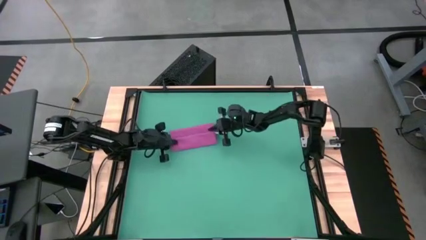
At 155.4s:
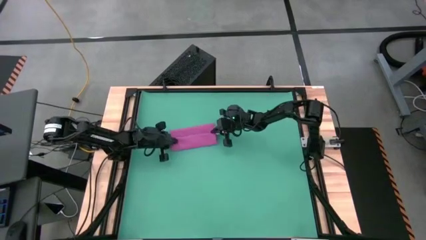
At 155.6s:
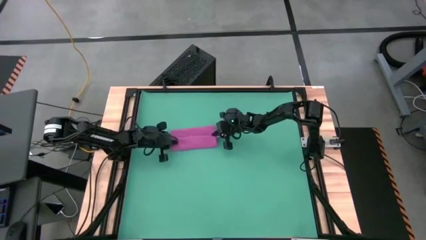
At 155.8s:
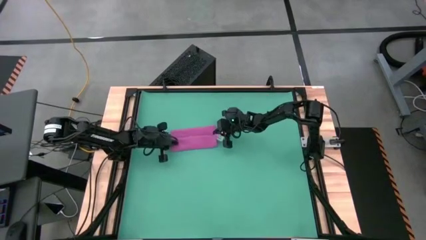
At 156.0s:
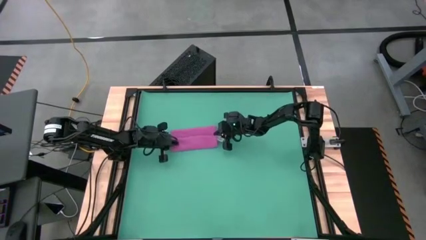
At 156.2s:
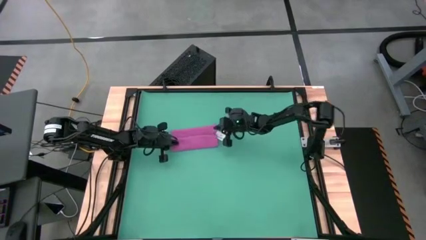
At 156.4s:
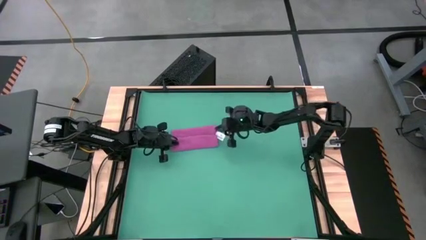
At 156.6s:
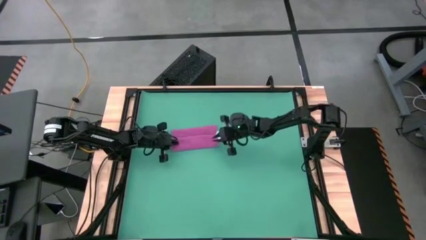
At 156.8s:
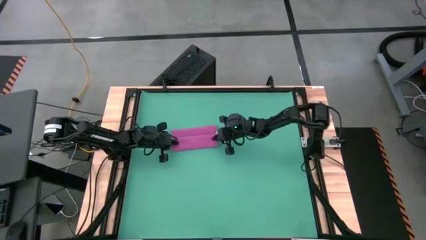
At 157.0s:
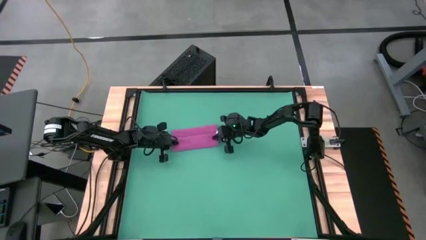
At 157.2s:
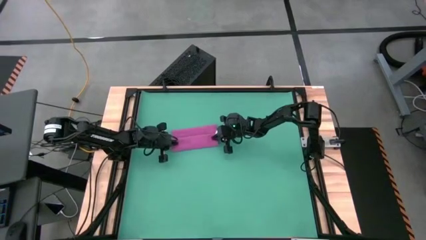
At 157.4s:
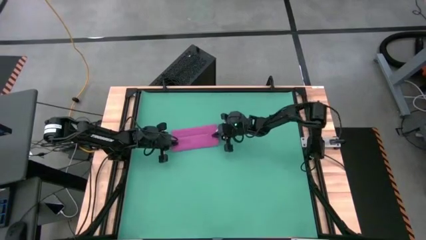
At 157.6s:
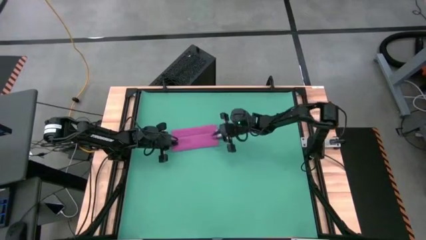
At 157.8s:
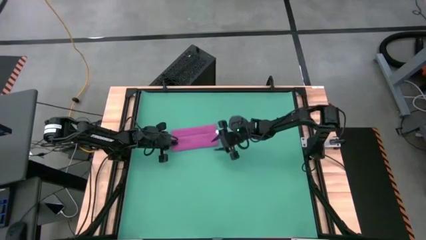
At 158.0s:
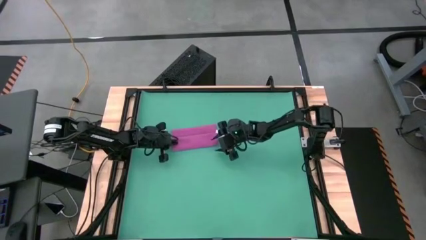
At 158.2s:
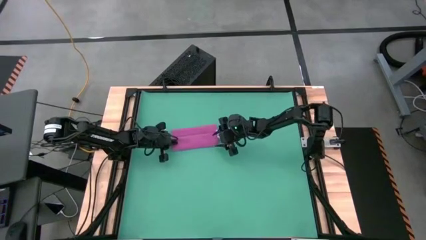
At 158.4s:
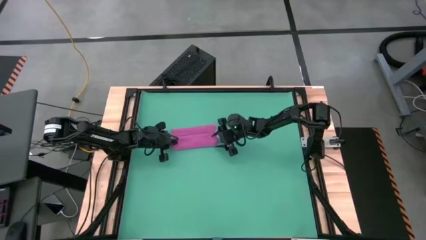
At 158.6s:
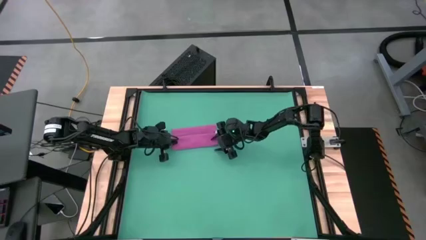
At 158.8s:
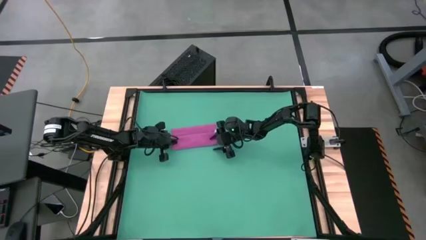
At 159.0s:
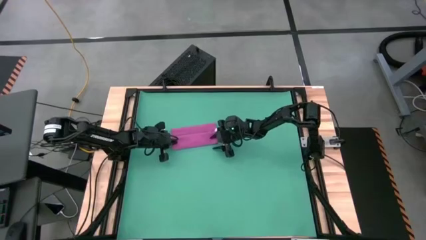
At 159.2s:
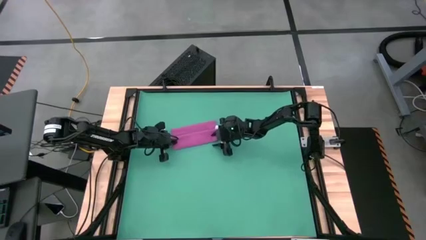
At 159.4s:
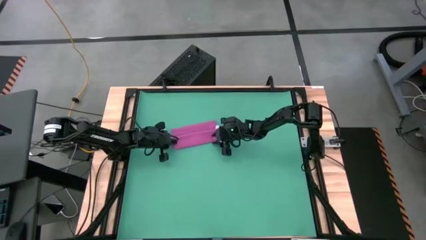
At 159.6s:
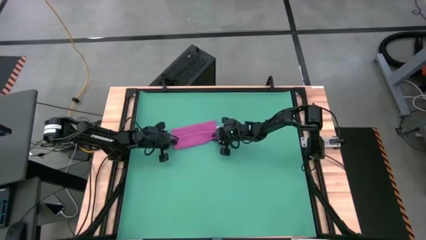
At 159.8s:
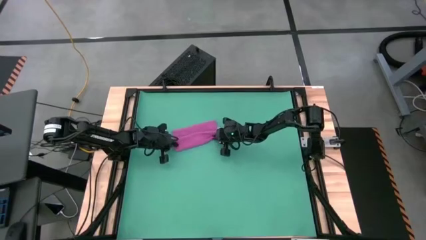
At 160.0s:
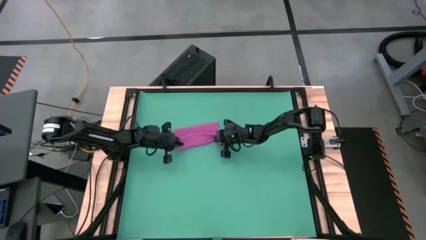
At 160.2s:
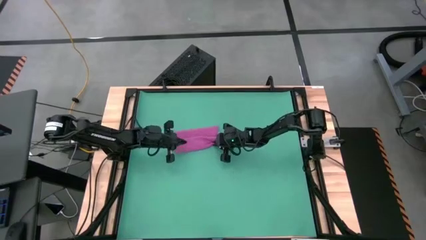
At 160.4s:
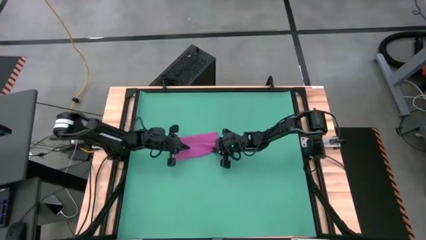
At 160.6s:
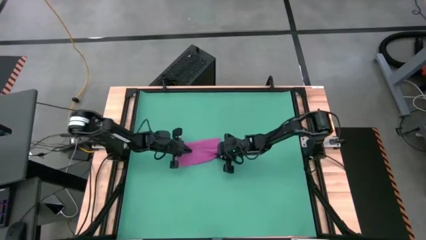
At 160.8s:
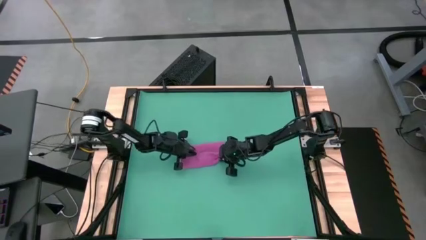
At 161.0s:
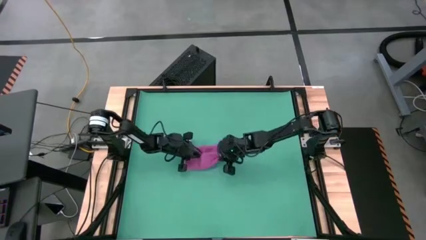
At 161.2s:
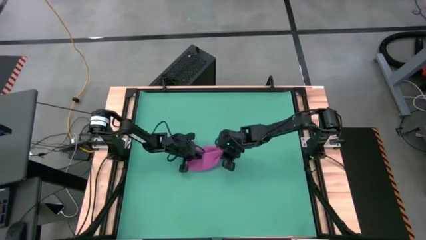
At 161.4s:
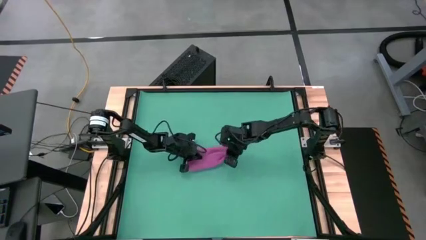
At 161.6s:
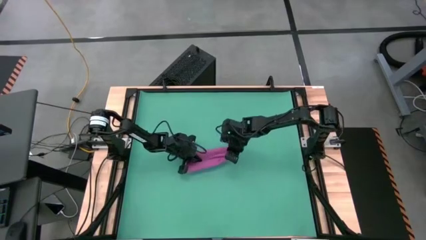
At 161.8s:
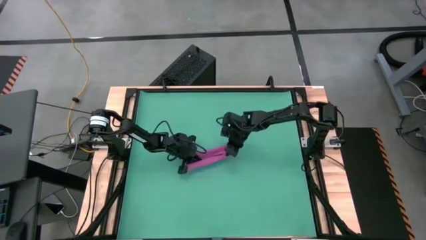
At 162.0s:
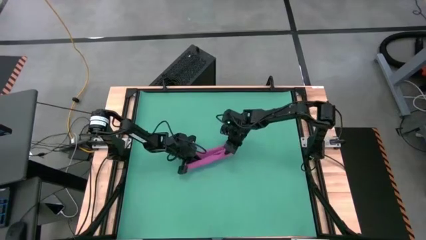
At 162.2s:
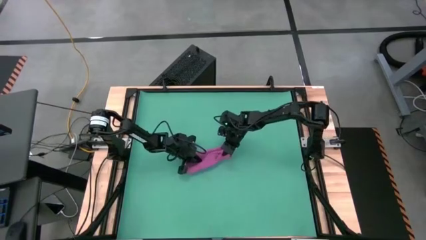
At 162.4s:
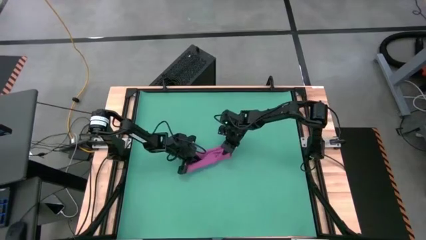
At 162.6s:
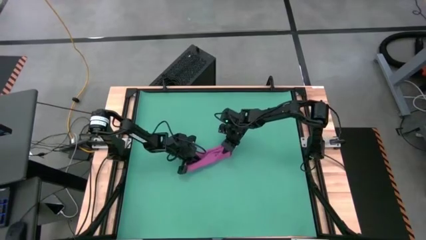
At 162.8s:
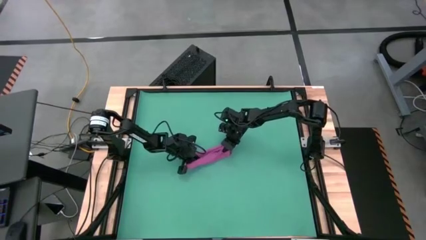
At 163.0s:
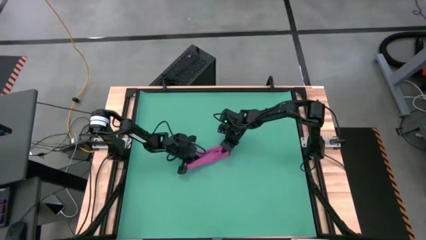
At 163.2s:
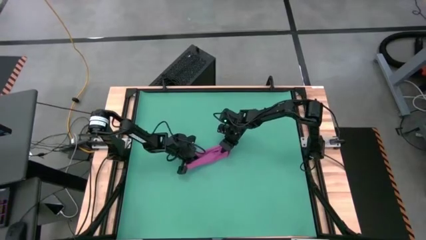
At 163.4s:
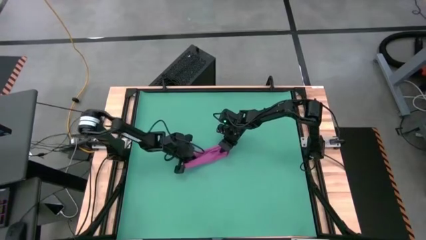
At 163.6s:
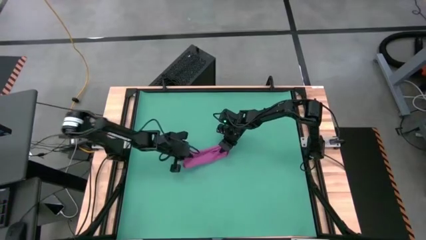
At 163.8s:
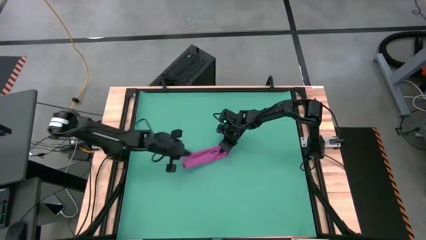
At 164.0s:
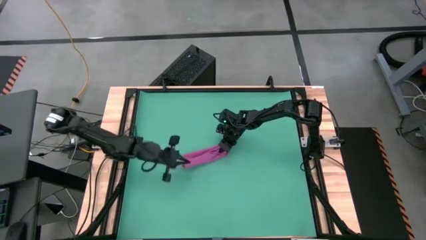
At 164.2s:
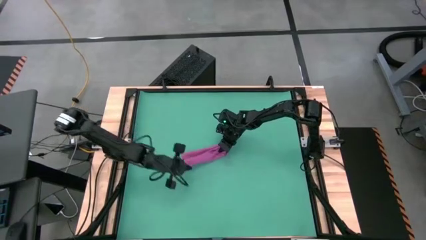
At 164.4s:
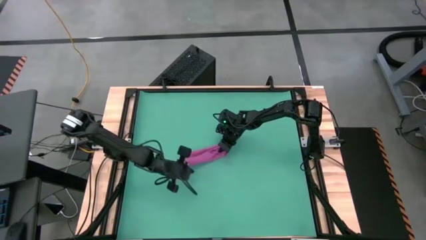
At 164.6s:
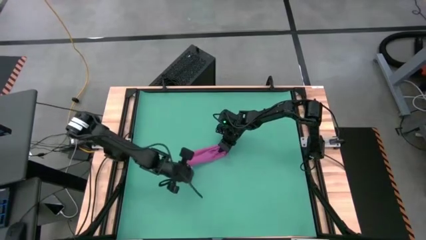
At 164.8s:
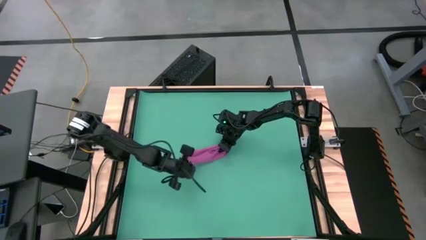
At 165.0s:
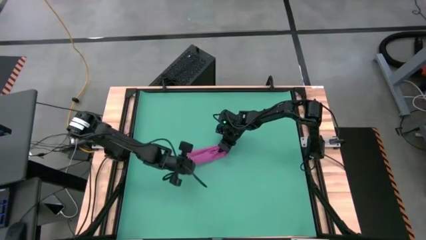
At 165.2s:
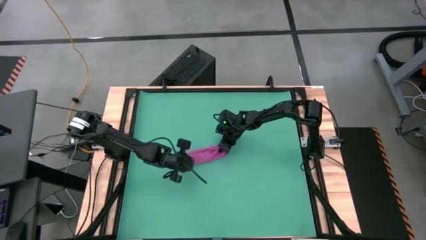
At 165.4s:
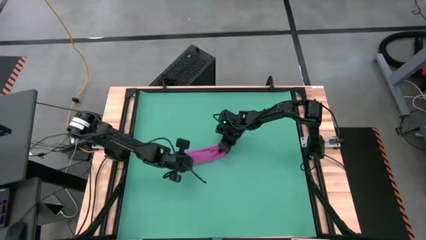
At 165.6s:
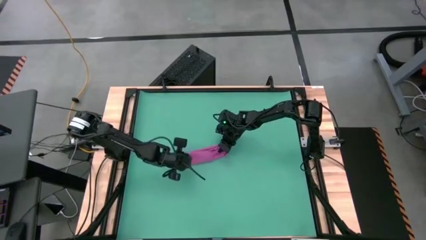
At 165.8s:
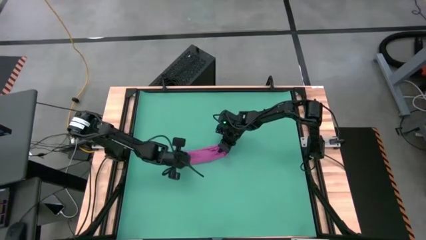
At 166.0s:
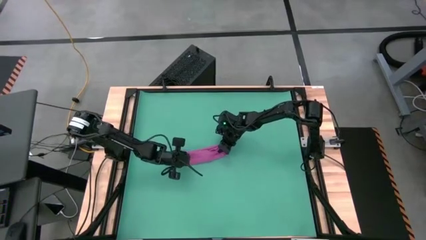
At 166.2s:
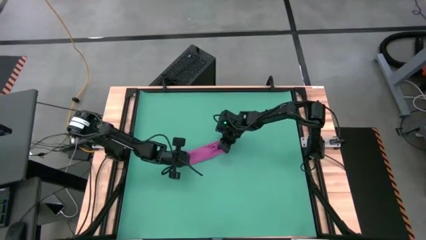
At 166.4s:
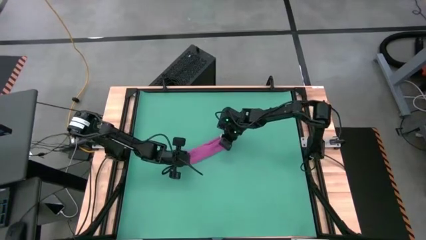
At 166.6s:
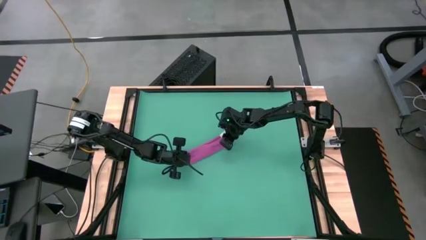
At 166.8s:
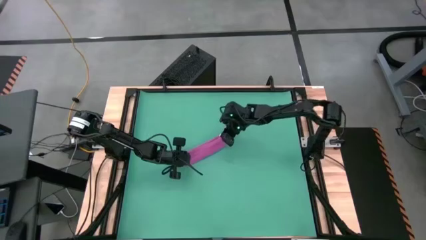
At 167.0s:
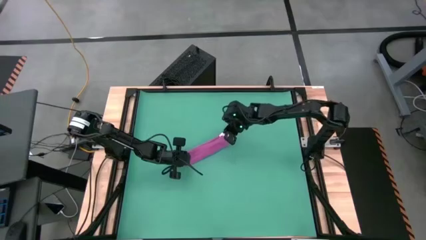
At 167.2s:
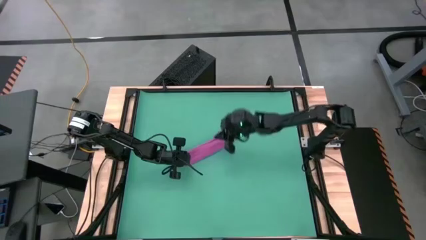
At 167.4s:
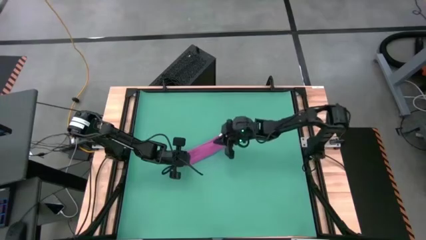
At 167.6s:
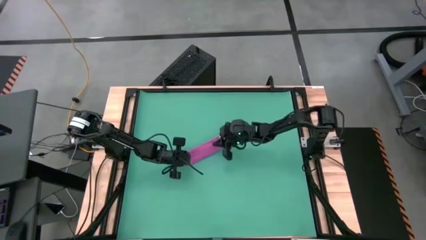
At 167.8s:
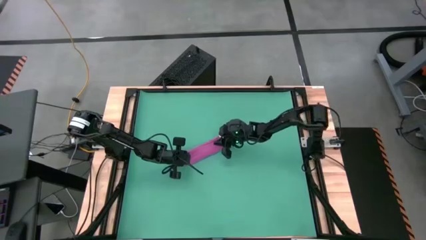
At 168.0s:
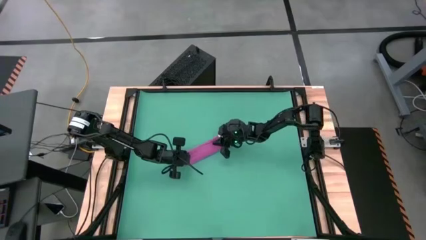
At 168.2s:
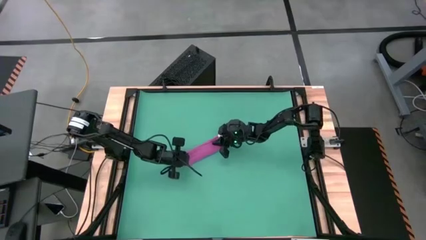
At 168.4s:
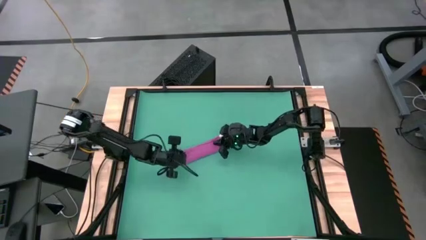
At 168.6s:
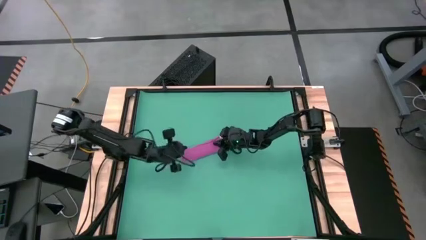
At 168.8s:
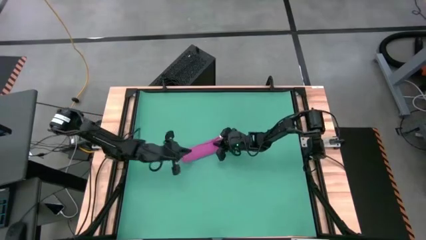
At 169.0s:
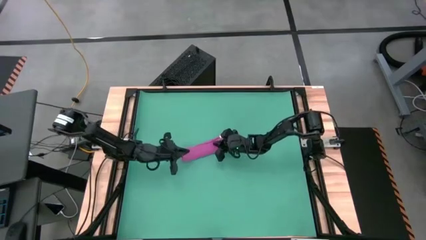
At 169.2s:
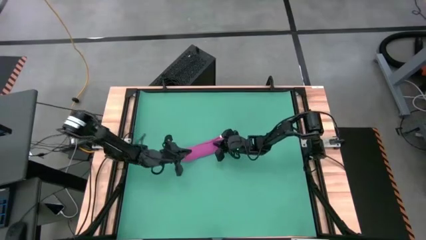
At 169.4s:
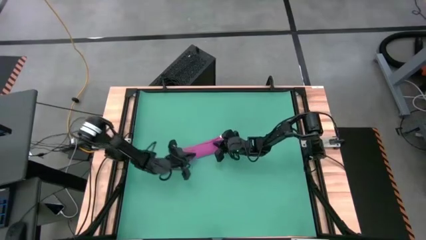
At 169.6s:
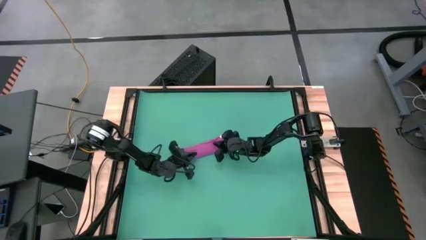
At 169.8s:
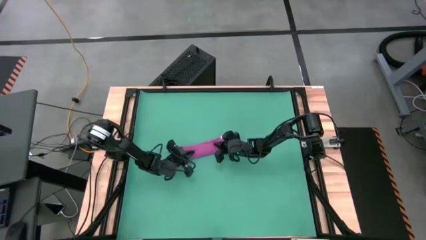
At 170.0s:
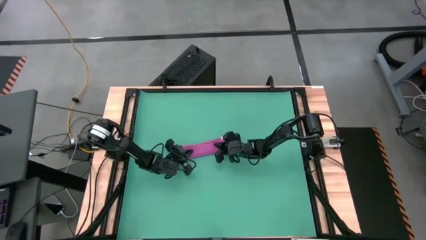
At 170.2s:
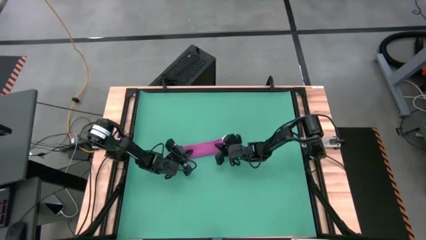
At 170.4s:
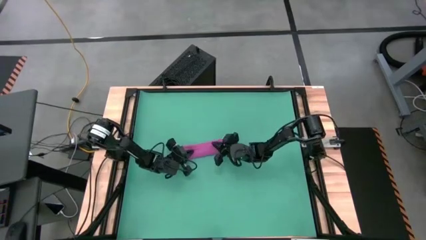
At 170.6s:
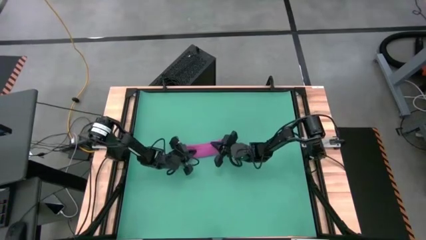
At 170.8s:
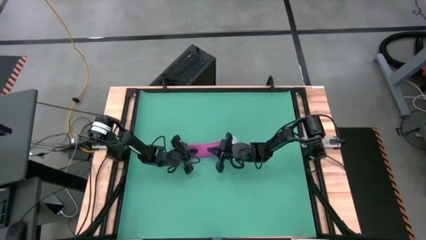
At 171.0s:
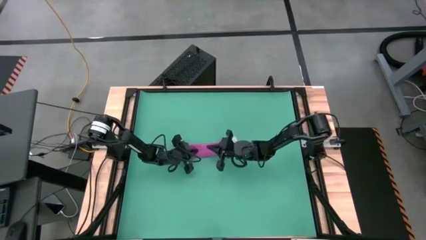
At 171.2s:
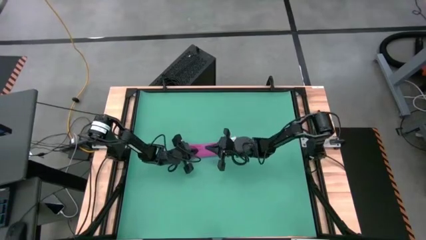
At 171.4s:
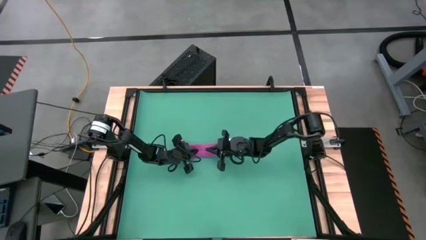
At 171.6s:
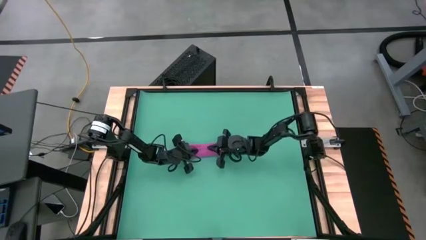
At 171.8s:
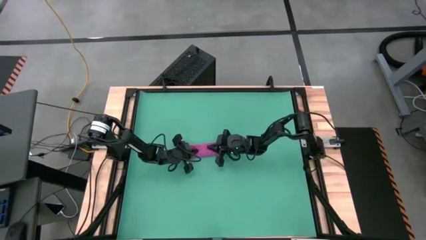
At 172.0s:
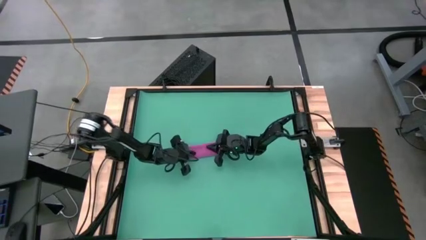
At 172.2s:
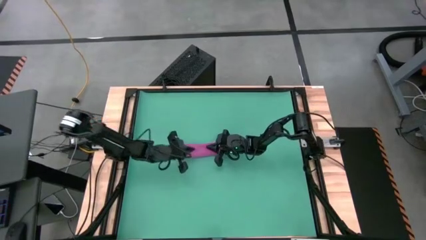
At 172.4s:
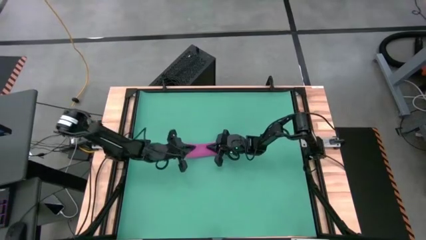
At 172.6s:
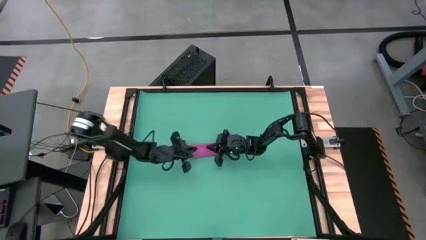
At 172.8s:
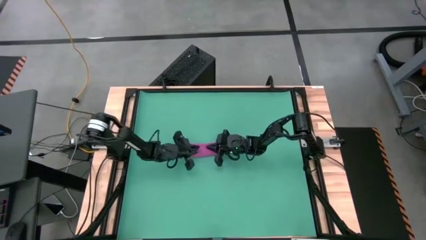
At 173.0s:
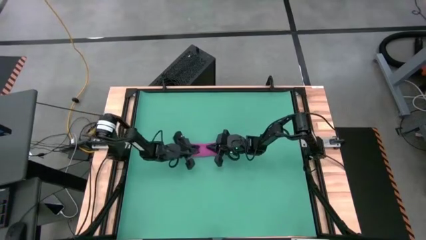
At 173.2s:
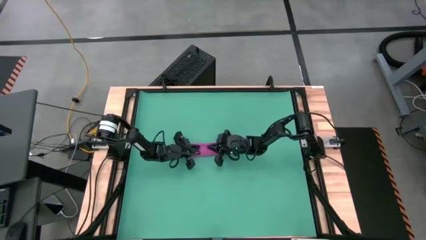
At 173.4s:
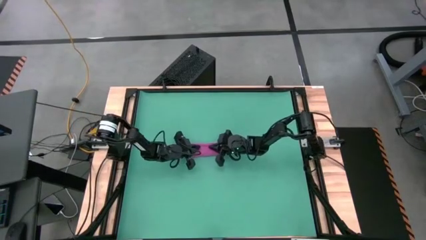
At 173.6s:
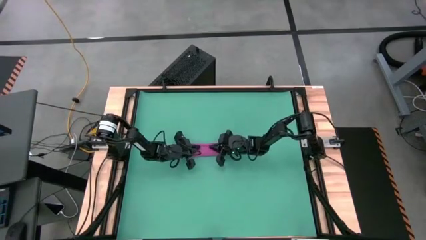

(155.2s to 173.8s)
Task: Roll towel into tight, uniform cylinder
Roll the pink towel
